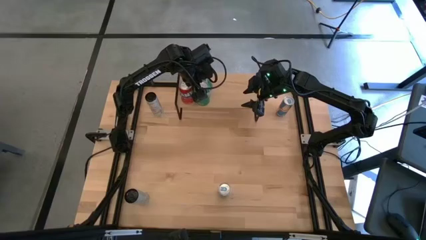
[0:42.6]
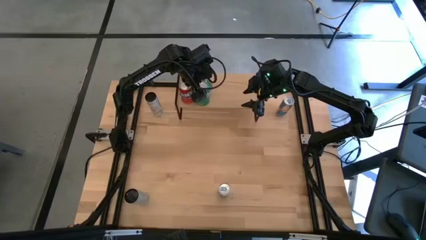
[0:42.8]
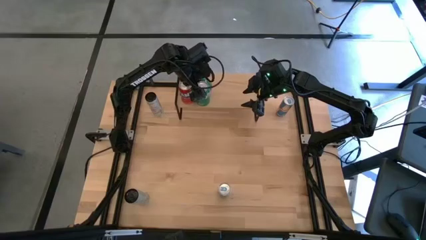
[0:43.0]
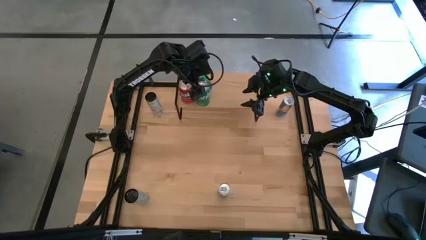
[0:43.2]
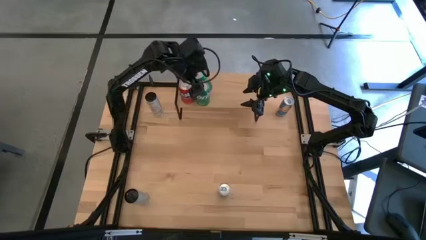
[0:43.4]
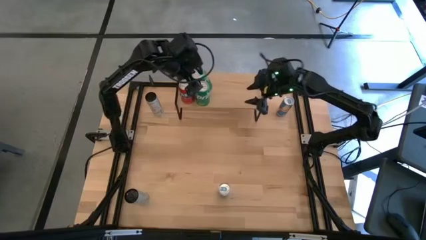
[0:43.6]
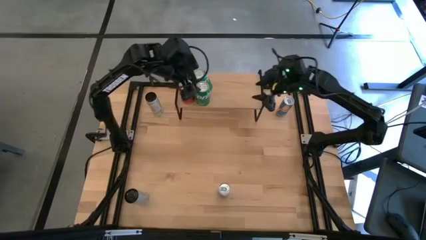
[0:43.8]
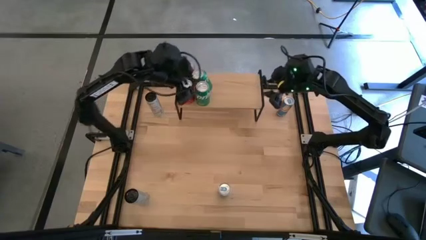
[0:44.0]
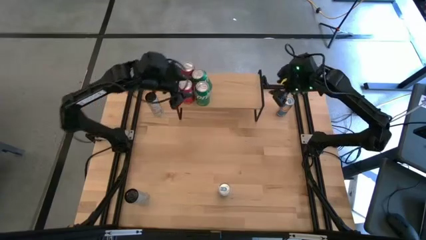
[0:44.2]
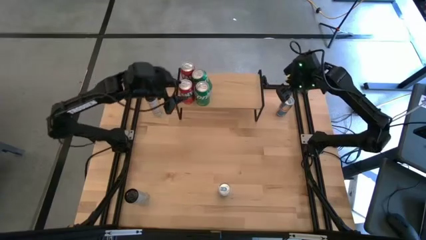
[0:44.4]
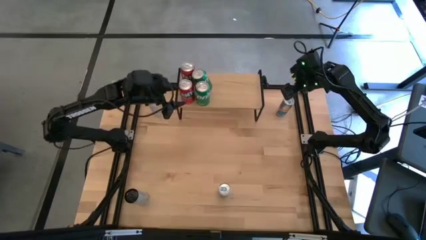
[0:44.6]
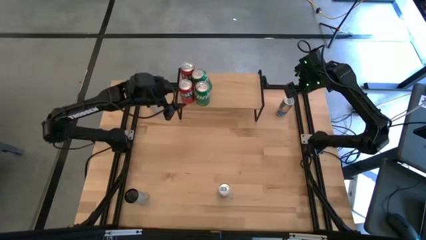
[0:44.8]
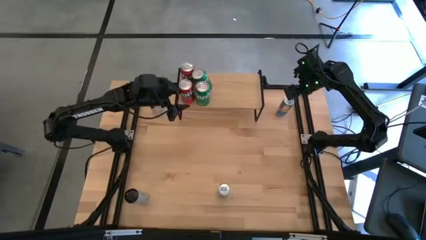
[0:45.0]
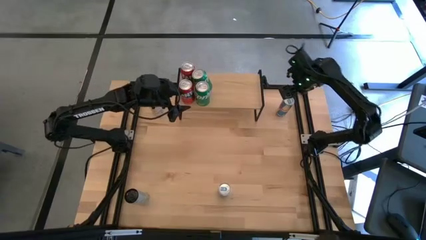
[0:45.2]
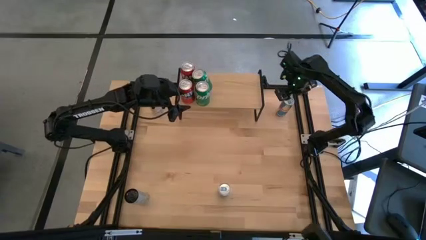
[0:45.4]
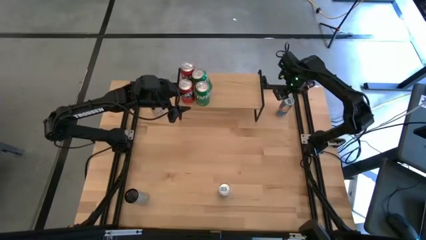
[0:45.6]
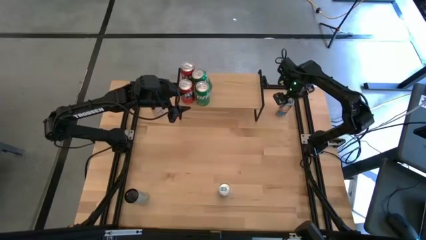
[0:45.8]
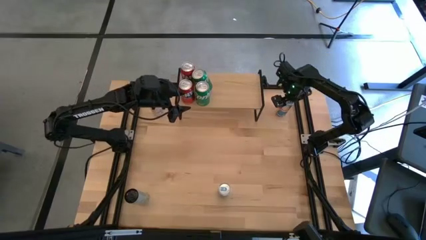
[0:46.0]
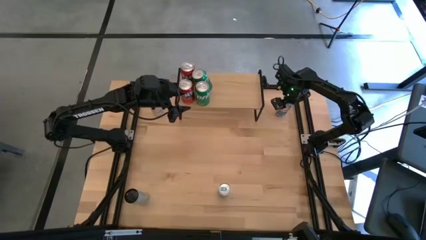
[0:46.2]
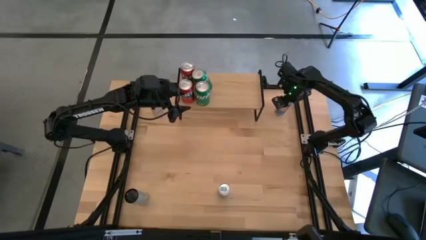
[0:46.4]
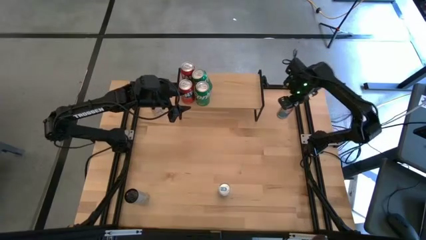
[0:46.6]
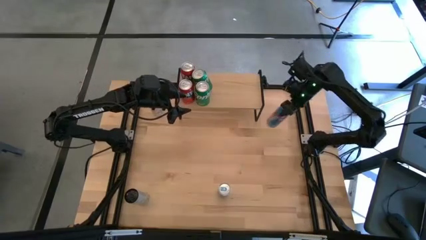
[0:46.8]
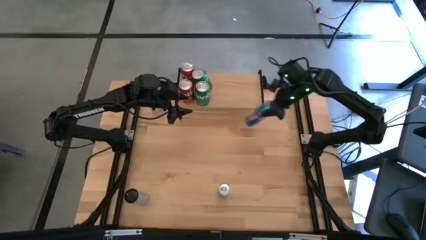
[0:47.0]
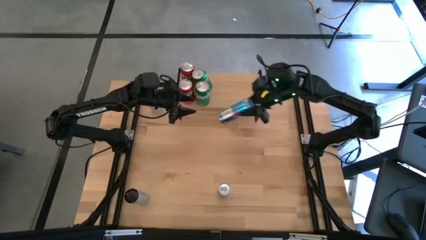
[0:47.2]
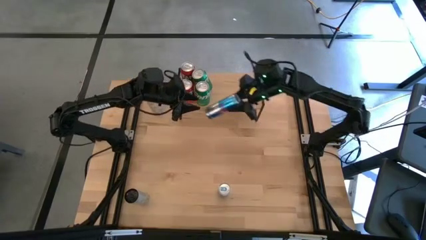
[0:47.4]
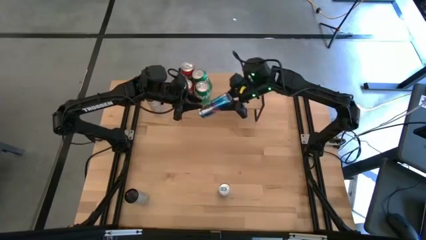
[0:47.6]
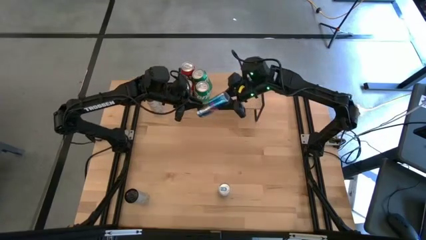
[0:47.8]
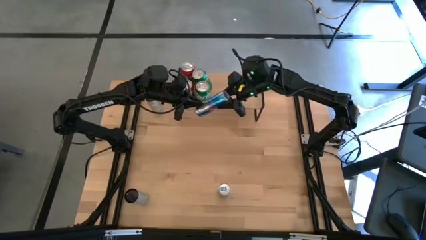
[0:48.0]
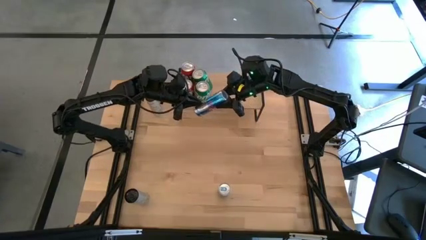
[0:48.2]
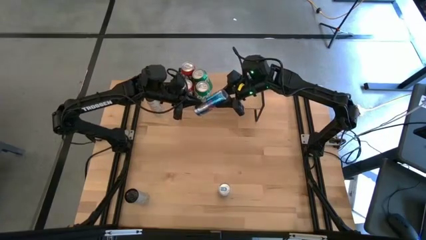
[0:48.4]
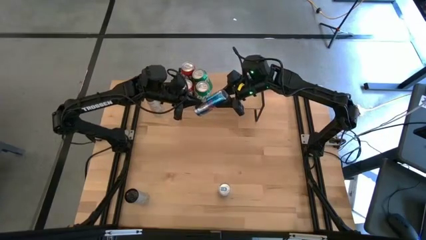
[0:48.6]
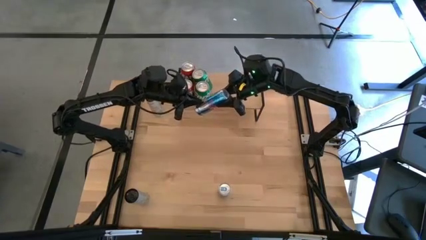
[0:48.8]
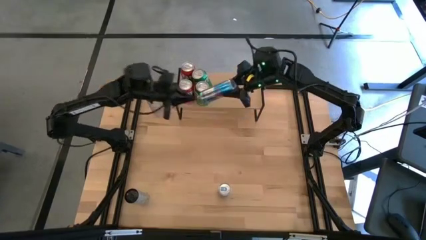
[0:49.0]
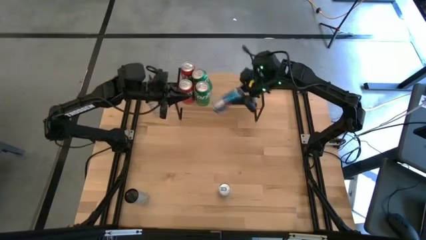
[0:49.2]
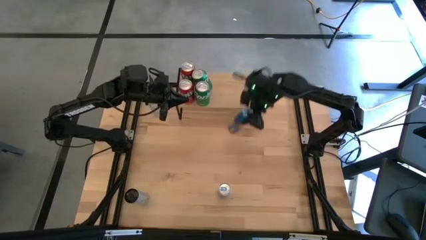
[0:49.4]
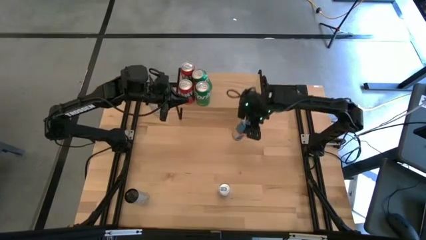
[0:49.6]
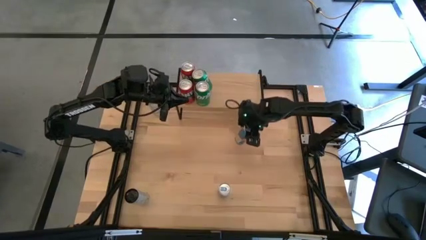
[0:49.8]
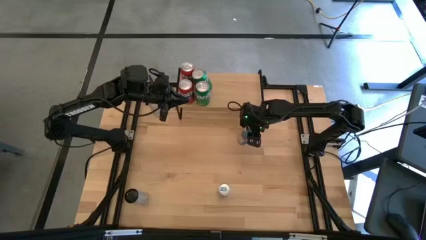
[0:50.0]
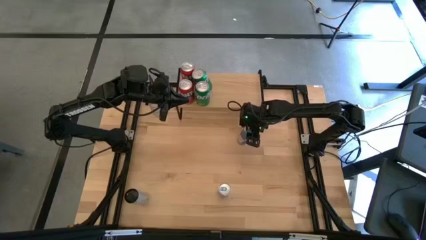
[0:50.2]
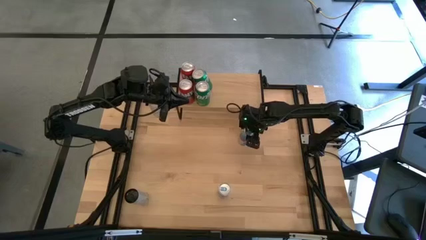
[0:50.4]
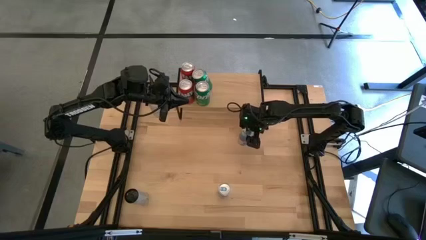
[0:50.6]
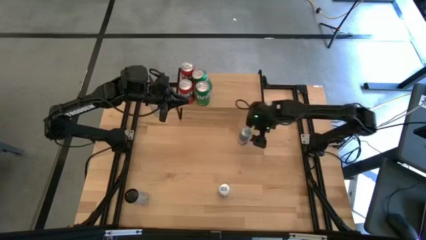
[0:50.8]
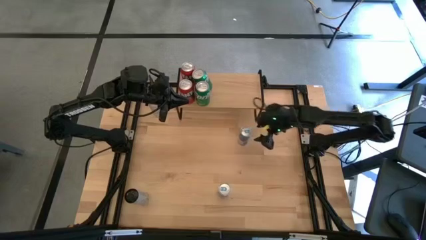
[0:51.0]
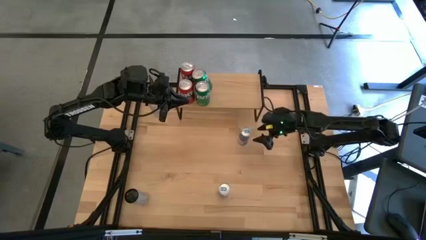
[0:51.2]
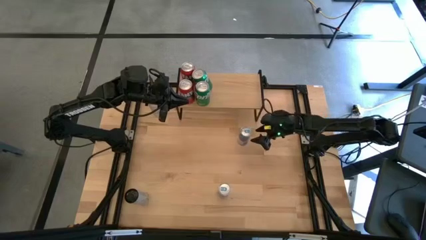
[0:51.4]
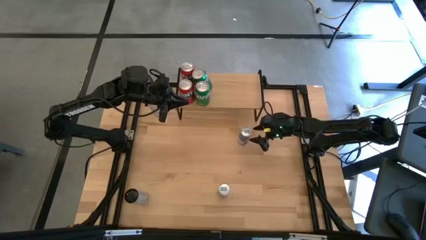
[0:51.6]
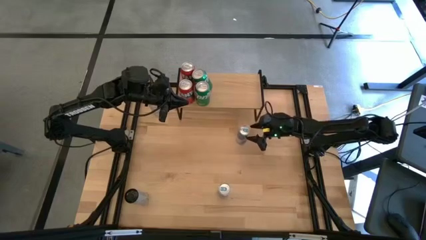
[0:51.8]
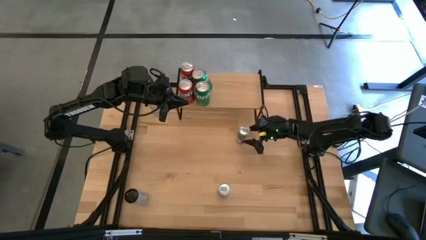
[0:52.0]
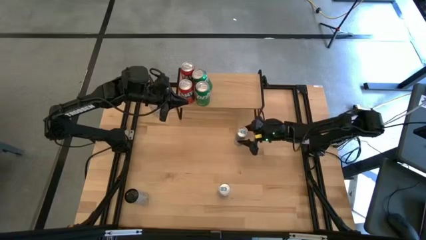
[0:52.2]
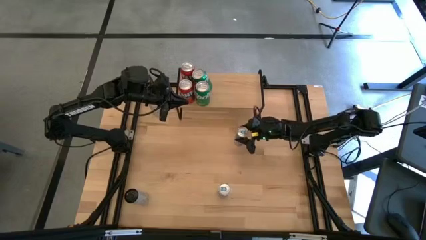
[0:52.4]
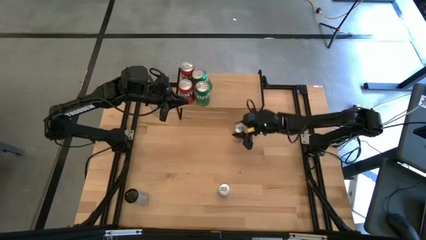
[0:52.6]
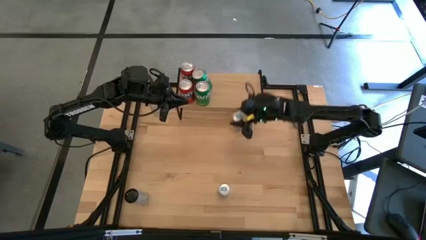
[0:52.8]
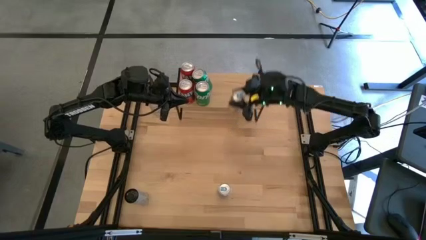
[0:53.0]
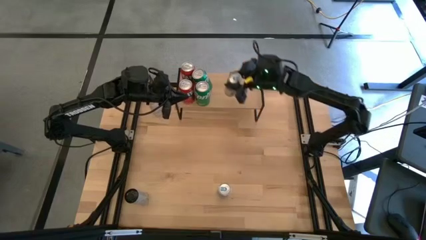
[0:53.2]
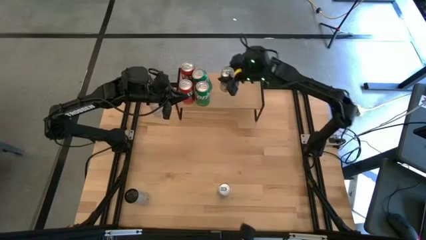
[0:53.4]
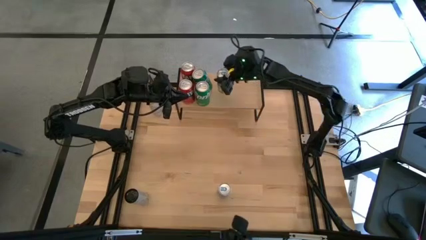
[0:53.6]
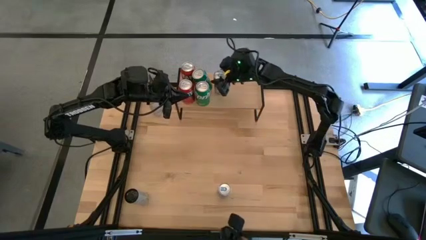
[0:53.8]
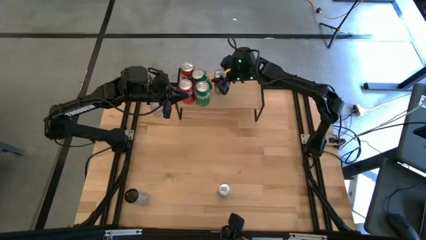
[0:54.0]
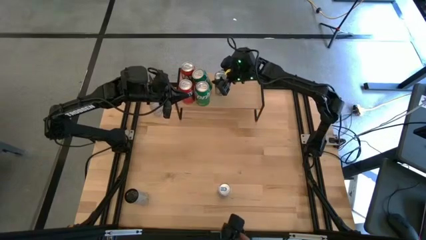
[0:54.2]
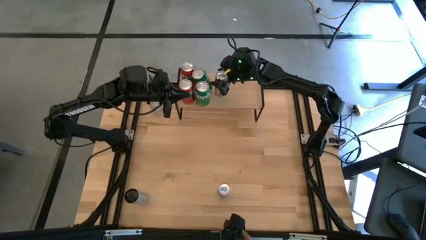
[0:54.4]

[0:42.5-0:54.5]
Task: Place canned beverage on shelf
Put the top blue soda can on the shelf

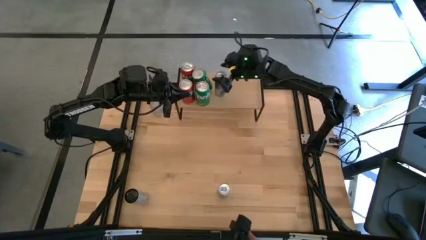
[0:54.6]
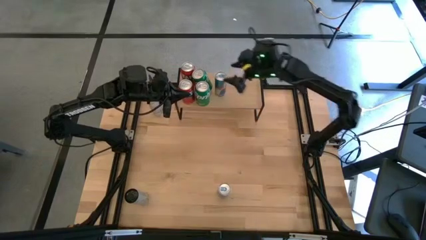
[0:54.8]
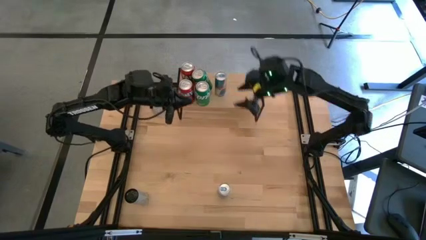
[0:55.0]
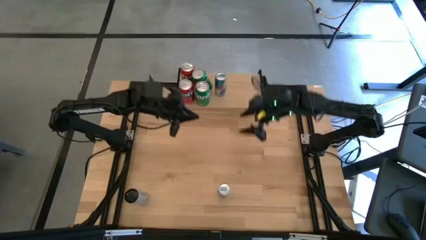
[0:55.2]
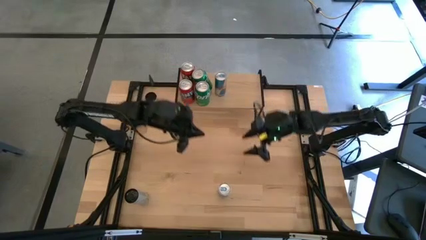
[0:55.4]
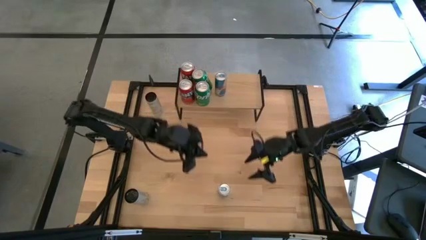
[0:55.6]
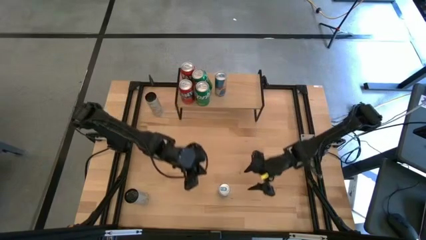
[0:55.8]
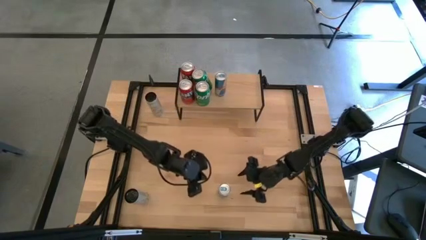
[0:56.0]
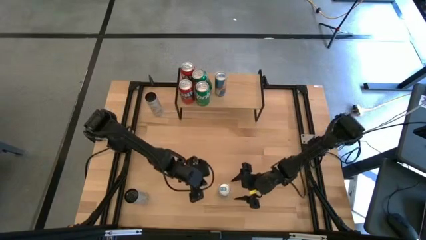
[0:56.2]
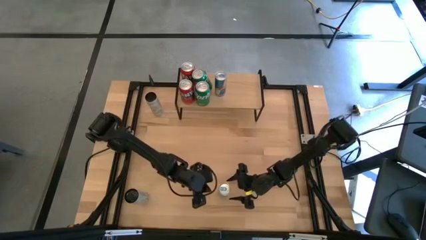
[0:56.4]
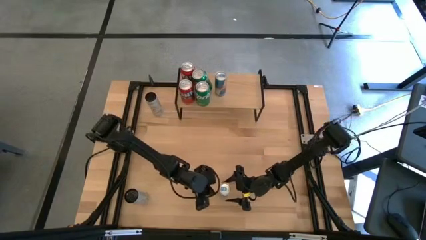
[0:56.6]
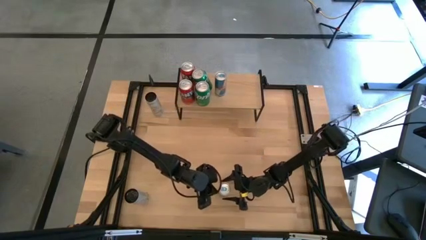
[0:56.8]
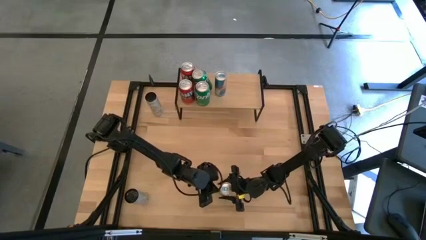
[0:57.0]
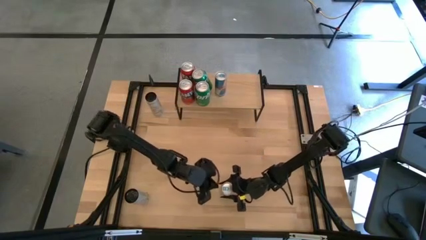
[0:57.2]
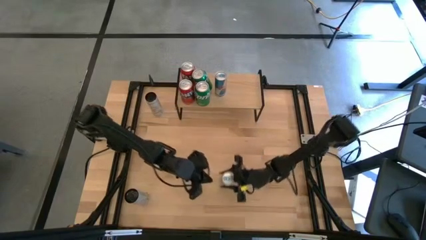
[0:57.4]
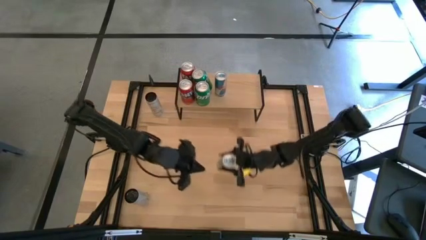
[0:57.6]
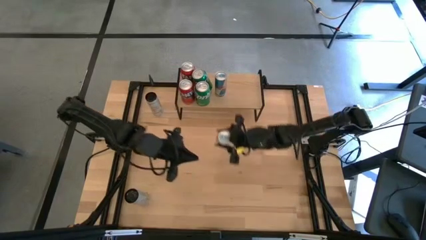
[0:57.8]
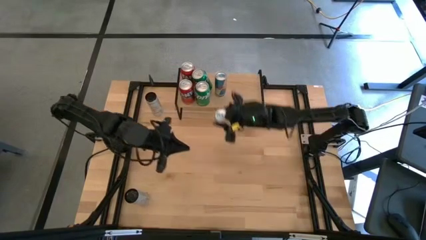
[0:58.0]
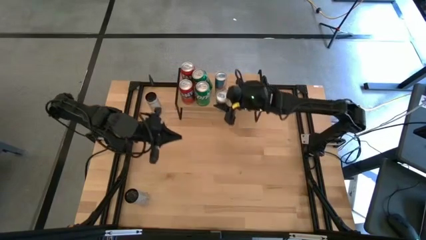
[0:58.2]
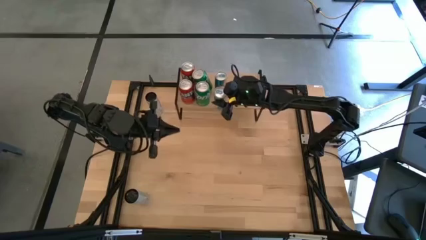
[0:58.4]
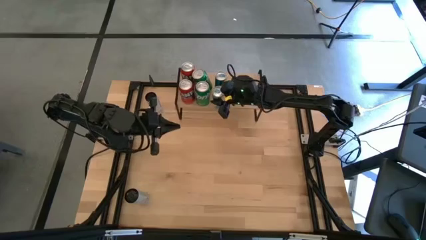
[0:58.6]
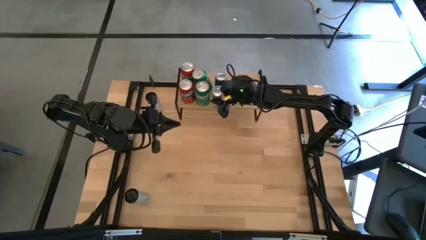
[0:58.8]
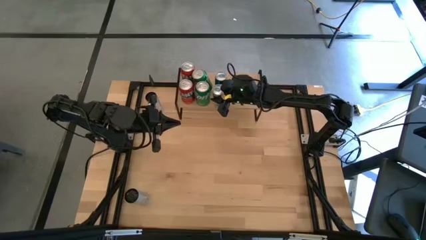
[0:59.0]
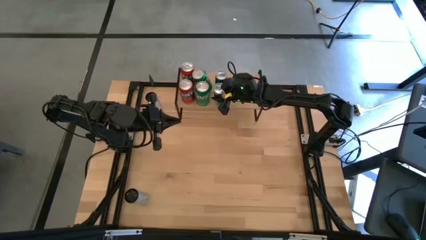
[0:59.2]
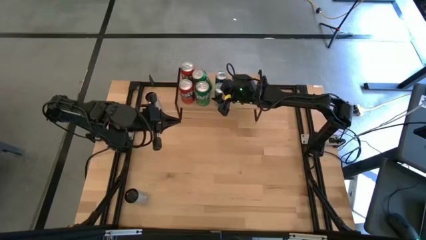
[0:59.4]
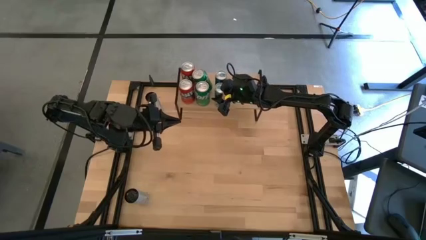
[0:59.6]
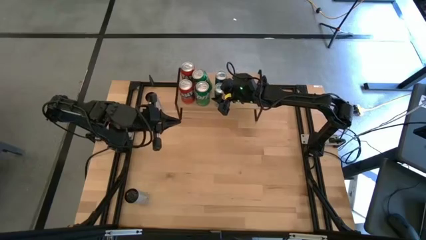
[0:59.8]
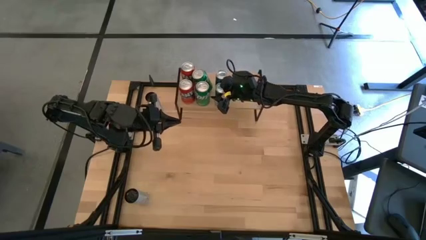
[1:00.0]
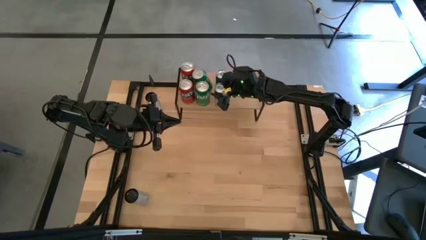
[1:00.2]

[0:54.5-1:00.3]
Put the blue soda can on the shelf aligned with the other blue soda can
